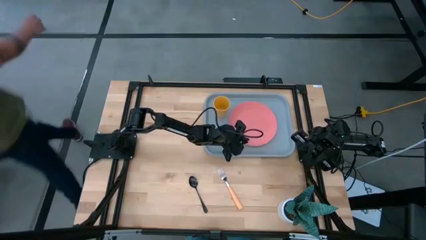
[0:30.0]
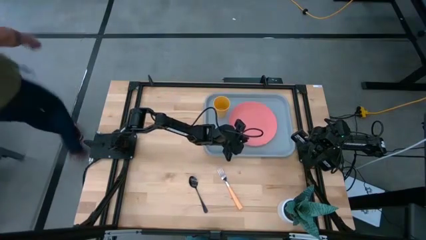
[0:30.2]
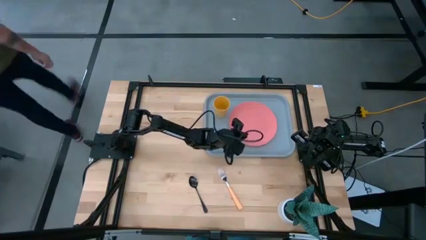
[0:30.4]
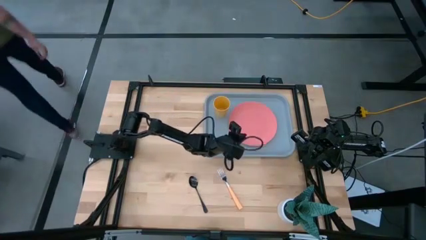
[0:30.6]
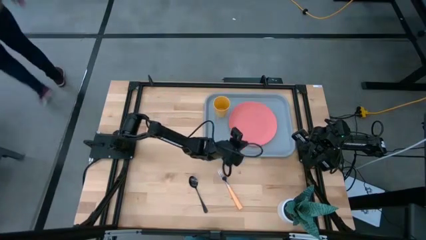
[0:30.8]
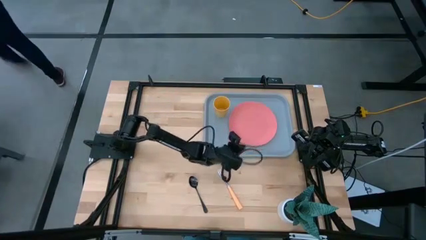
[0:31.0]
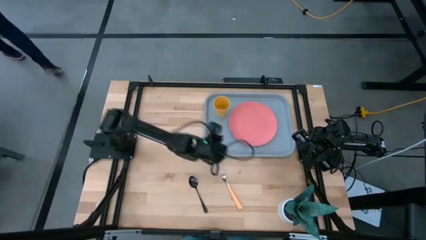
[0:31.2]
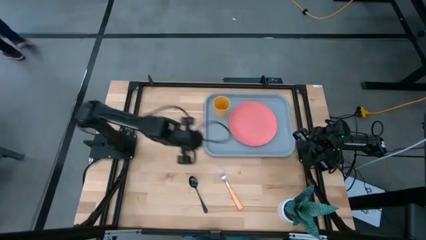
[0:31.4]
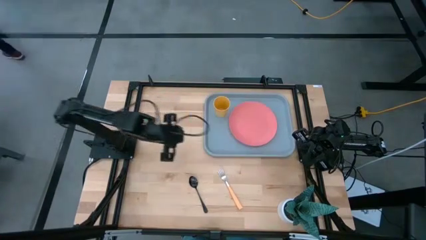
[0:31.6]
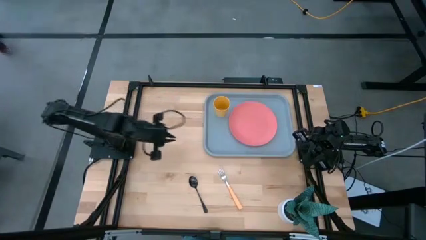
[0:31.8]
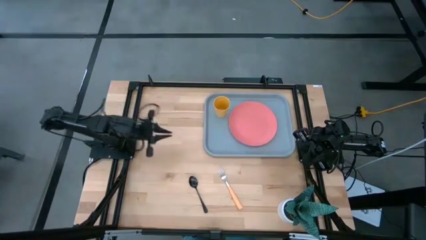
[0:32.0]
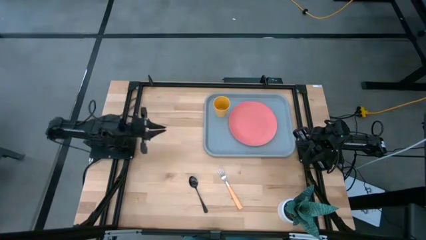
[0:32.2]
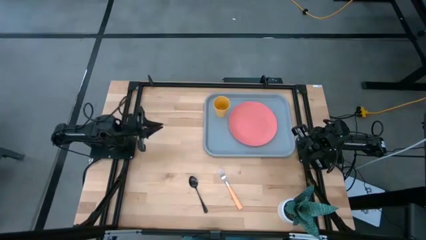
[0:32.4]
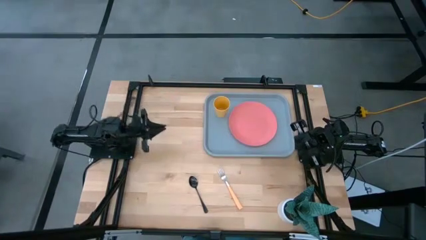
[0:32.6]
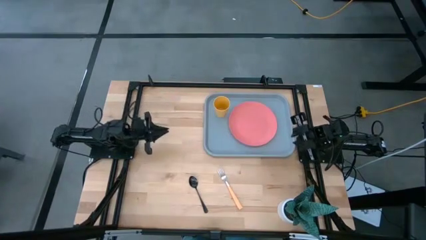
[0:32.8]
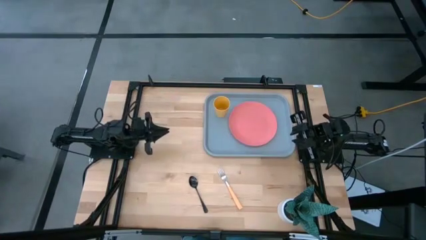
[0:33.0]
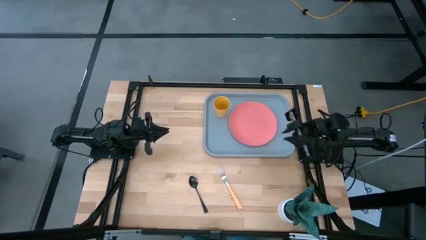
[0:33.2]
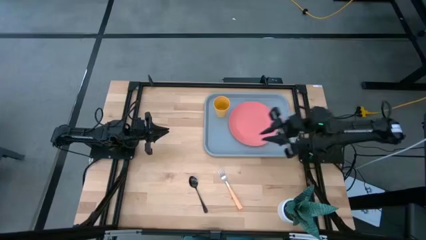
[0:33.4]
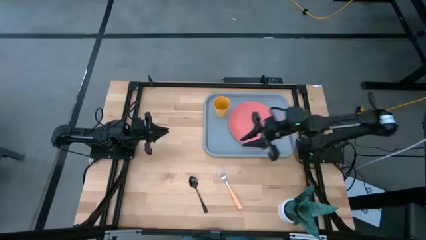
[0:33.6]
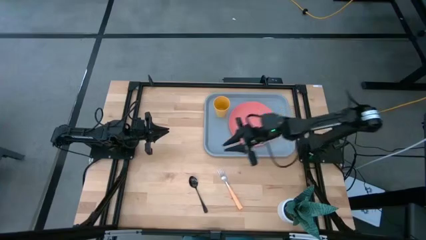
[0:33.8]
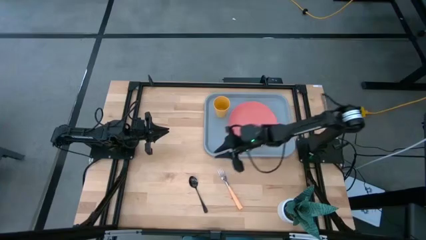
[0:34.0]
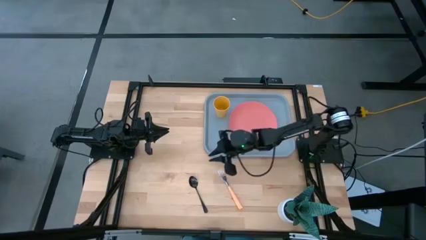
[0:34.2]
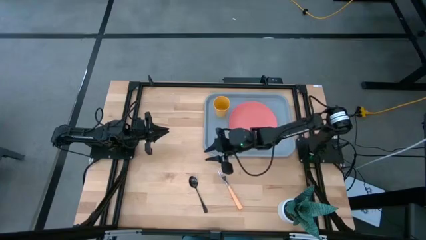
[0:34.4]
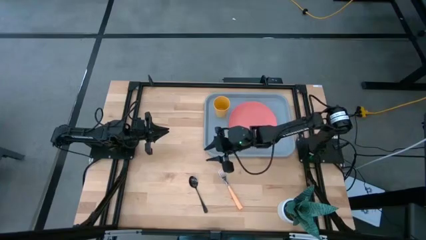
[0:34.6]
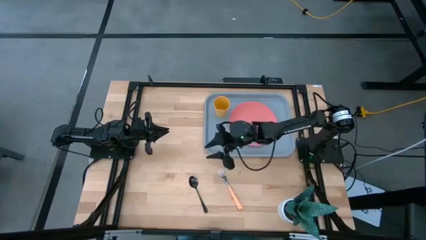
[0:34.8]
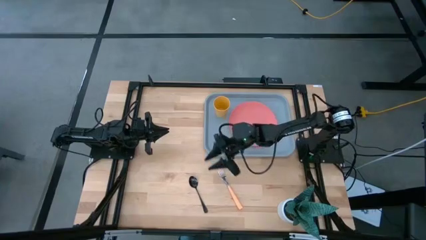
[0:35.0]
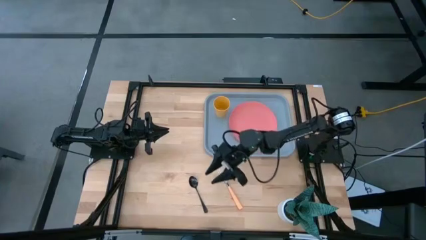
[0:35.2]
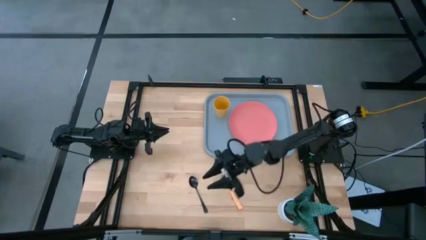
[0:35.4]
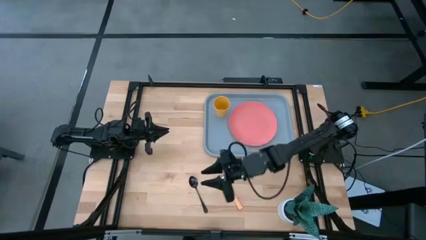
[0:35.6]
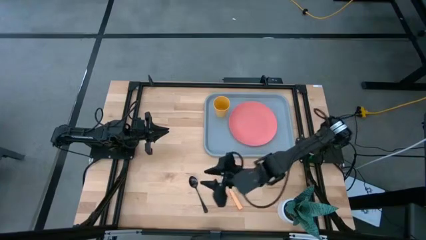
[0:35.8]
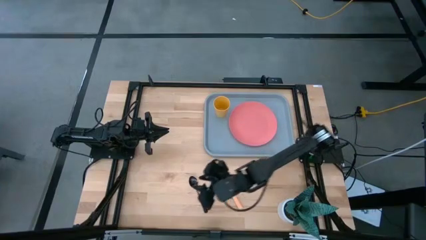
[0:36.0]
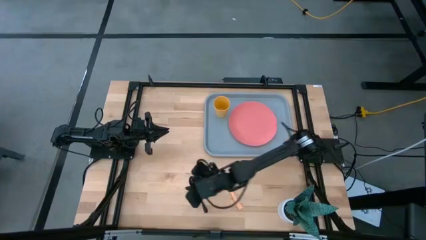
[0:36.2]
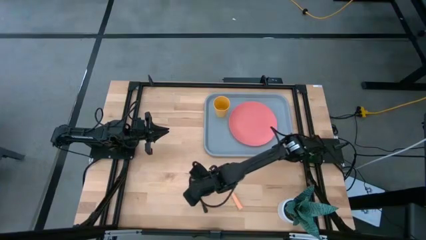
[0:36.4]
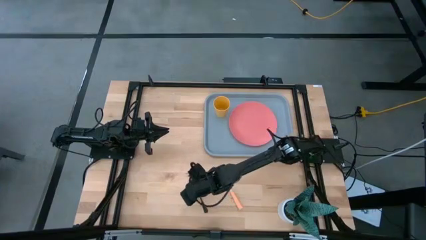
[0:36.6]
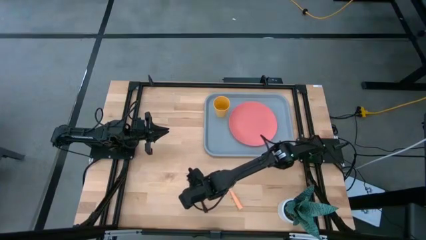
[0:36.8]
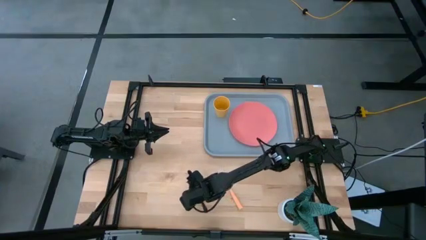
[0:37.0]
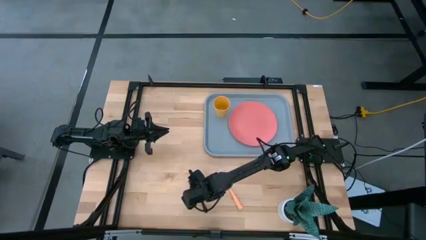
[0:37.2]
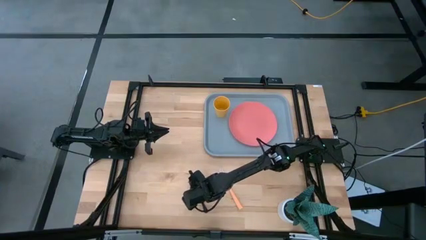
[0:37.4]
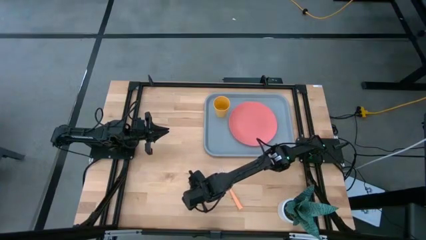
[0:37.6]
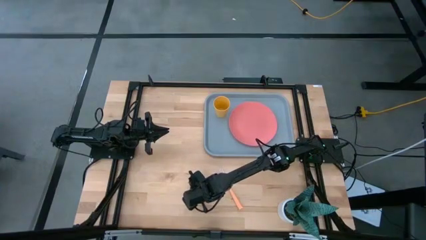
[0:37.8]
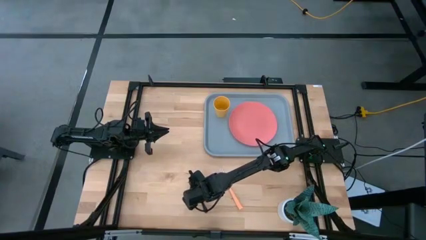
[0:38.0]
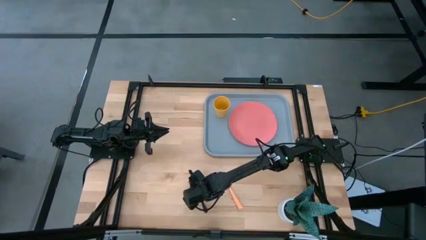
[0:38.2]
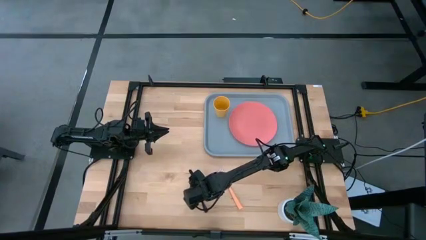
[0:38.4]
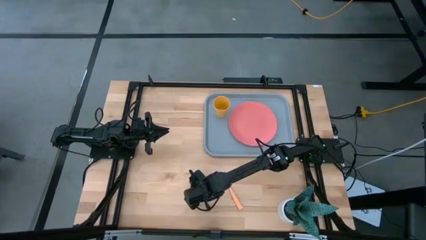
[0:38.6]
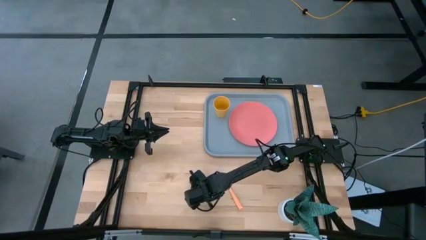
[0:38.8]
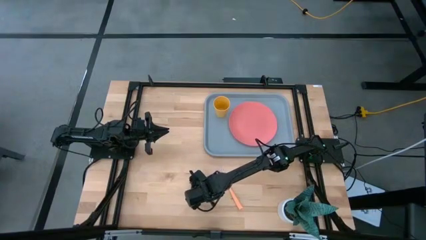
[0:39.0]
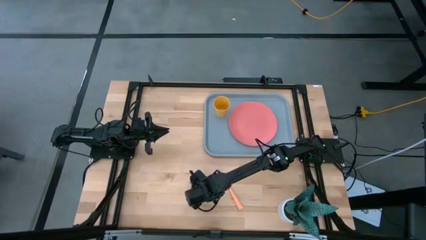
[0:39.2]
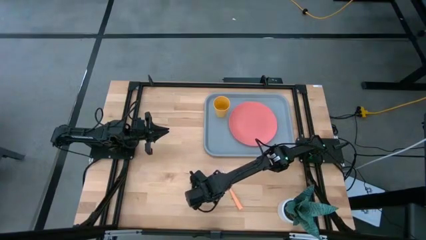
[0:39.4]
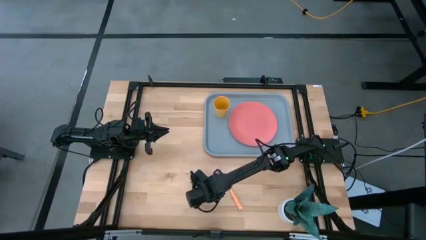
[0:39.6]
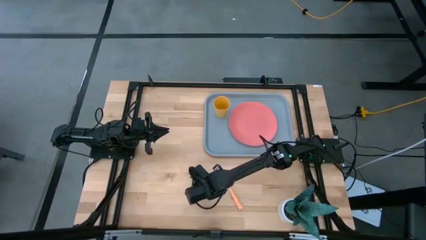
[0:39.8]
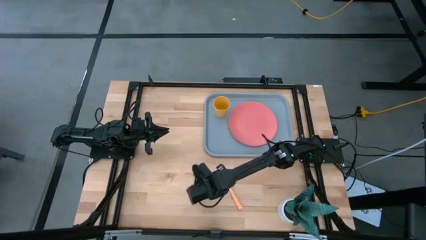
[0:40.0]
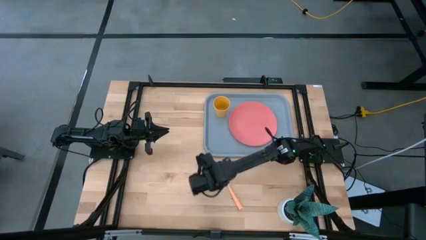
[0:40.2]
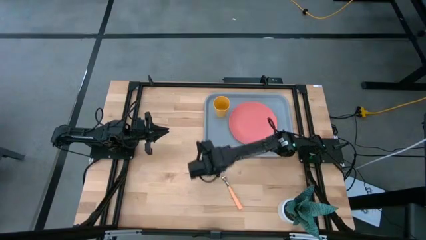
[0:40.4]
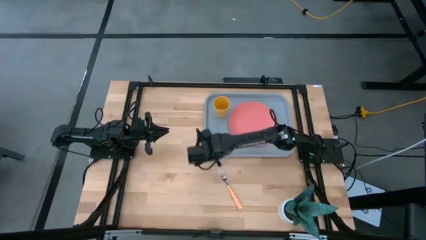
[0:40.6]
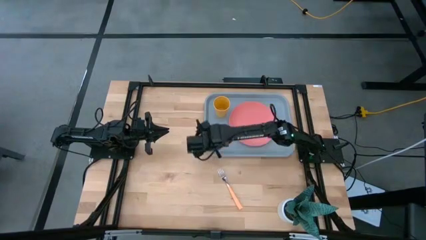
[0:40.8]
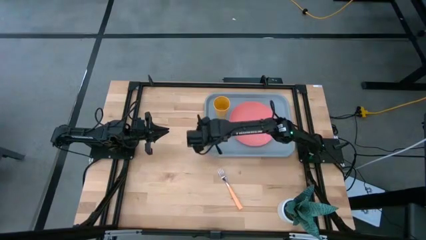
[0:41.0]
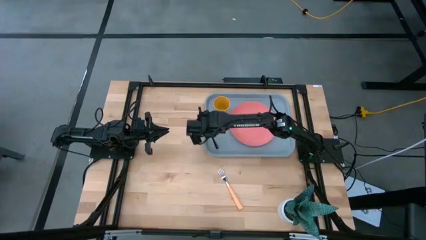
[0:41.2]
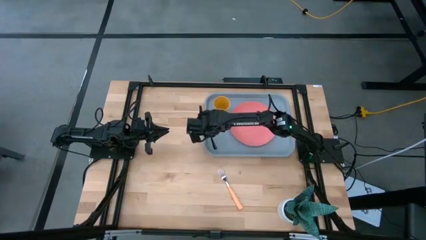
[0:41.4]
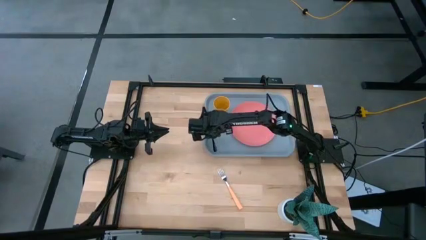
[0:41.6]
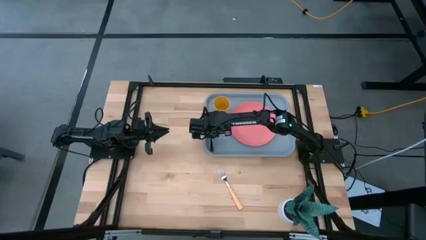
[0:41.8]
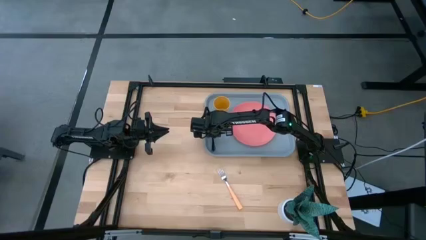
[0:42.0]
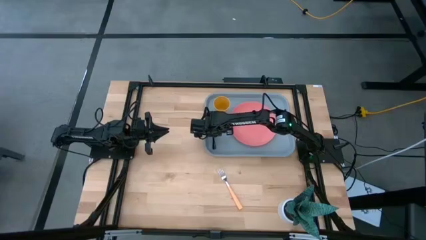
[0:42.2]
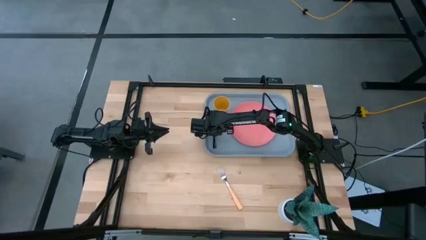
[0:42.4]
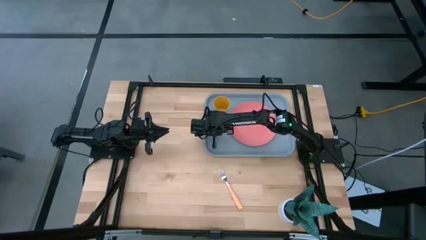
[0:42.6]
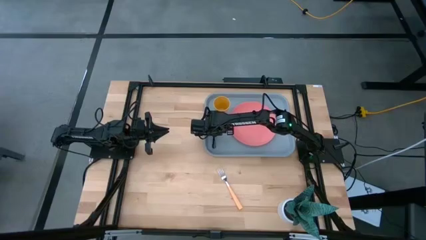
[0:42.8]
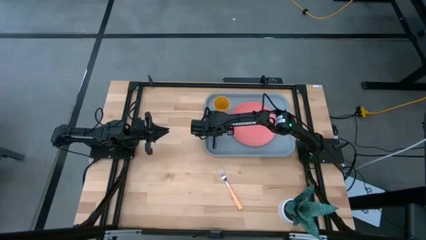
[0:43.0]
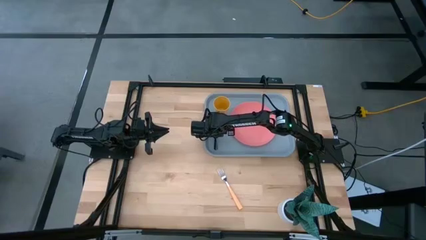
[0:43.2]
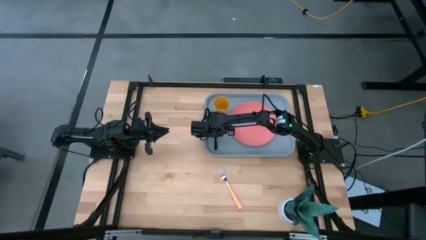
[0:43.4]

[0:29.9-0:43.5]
Task: Pick and place plate/cup/fork/spoon on tray
Put the black spoon on the gray tray under the yellow cup

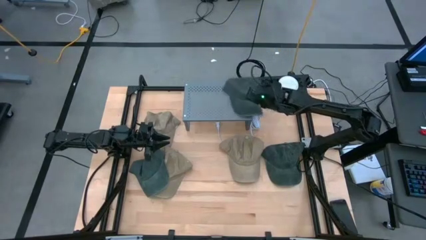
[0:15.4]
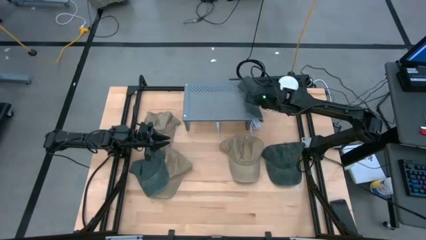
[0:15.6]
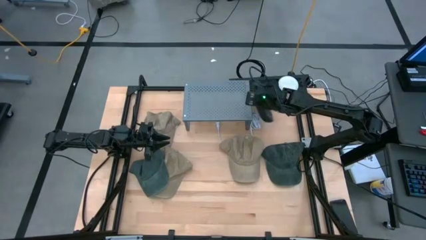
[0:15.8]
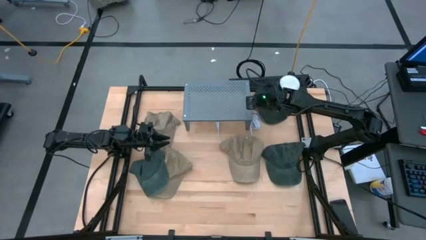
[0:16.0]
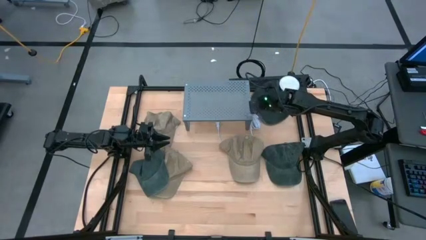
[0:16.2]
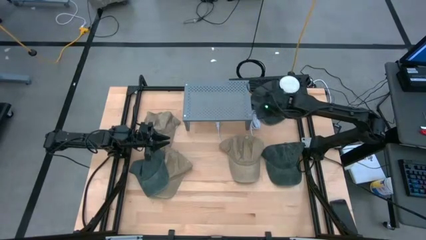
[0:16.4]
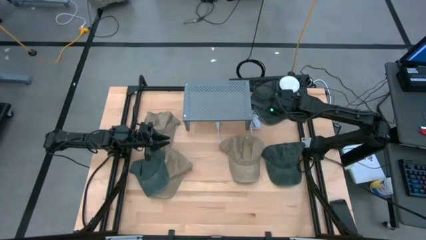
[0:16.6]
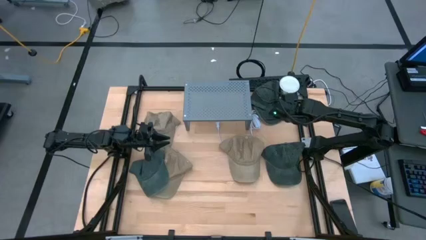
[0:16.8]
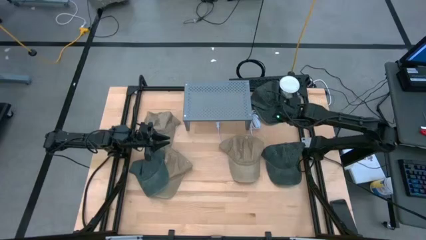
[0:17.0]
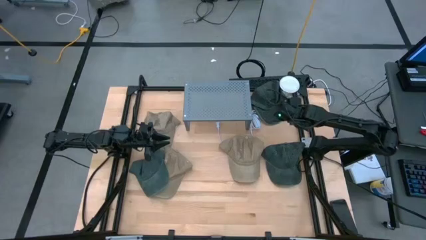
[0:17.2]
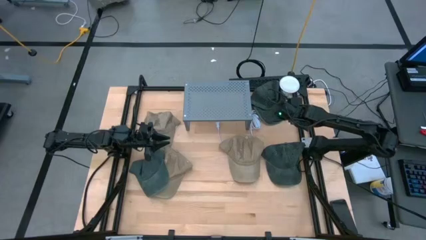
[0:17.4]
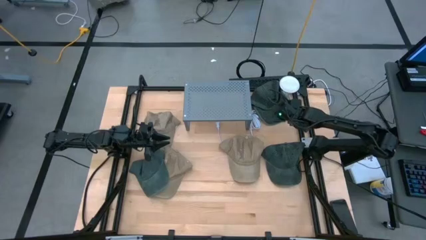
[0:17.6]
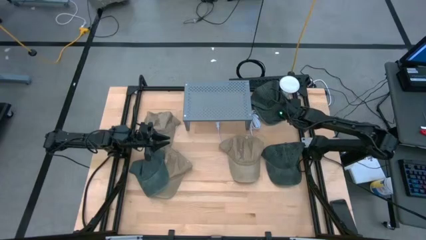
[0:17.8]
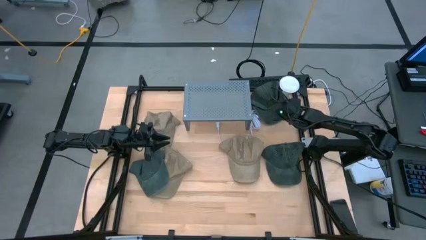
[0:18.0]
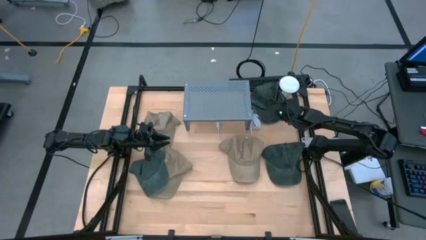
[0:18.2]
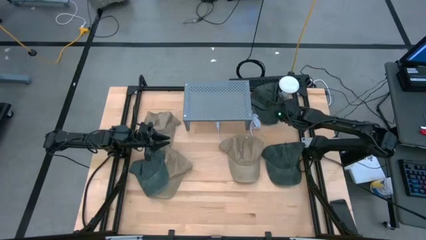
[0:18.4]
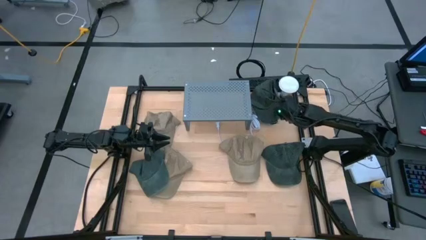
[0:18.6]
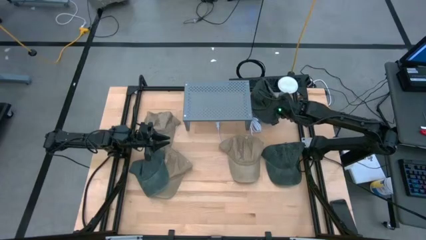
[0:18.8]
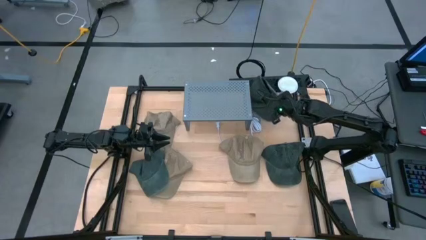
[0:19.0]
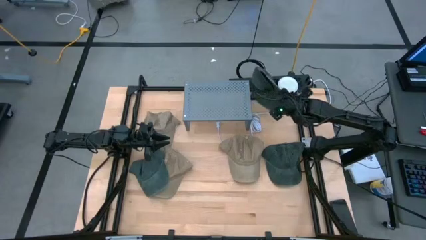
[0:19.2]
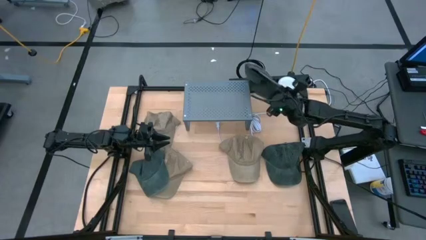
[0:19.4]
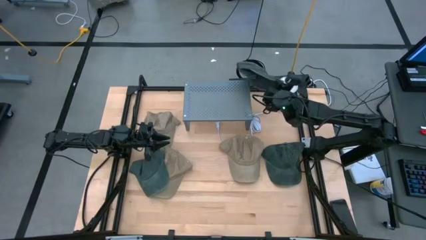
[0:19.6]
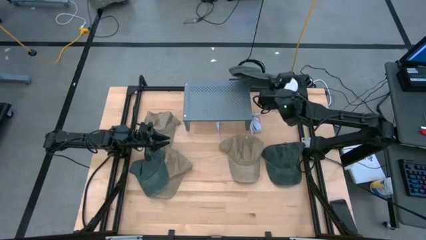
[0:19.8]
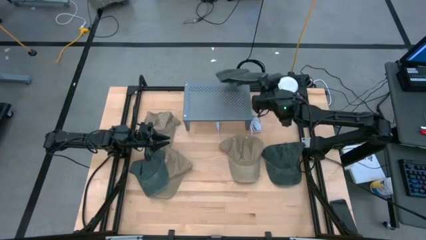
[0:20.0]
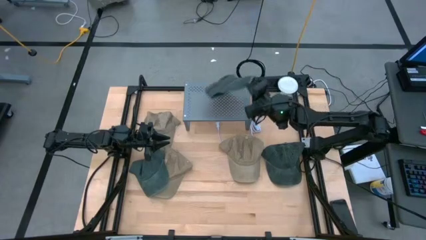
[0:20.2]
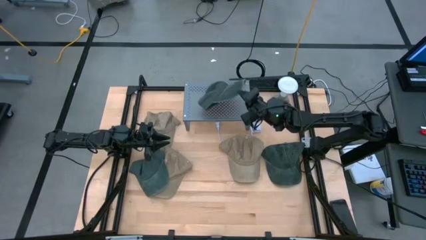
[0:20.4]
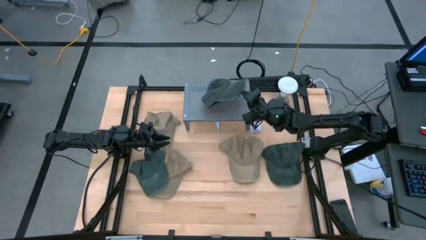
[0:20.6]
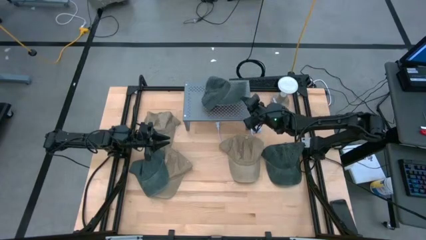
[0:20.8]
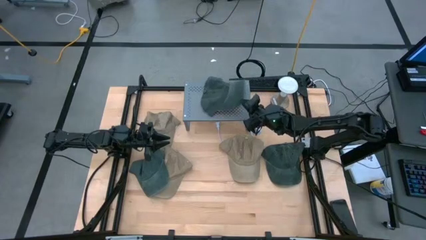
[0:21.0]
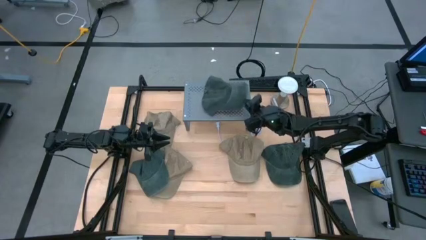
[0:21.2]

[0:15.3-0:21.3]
Task: Pick & Place hat
Put the bottom right black cap on the shelf
